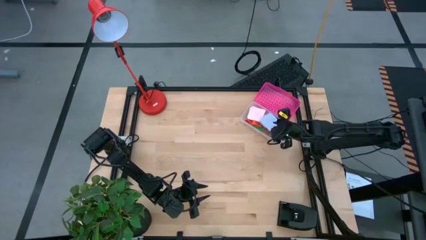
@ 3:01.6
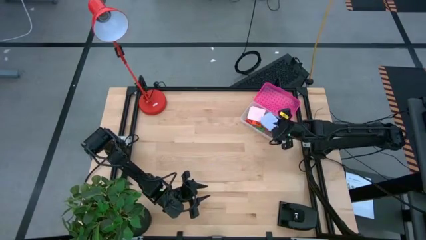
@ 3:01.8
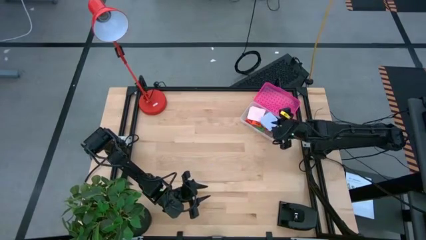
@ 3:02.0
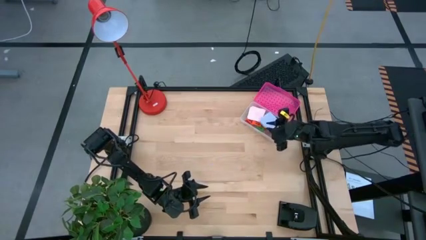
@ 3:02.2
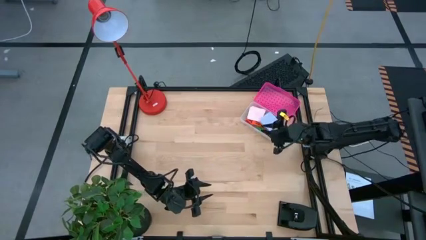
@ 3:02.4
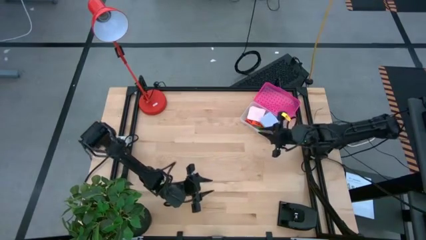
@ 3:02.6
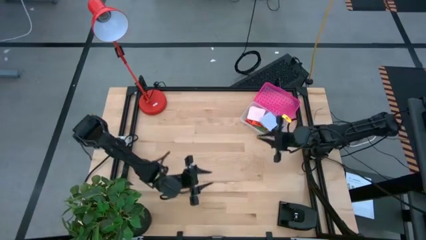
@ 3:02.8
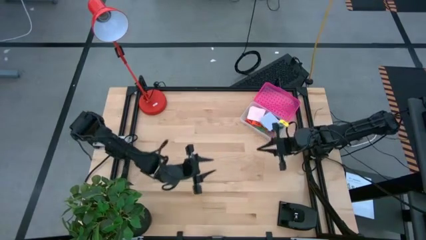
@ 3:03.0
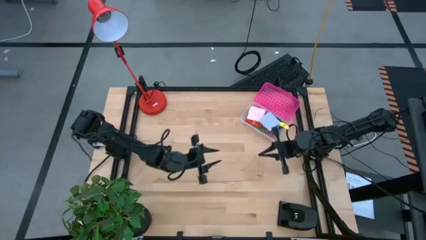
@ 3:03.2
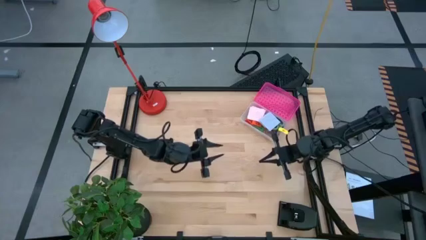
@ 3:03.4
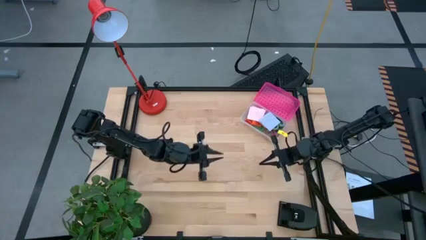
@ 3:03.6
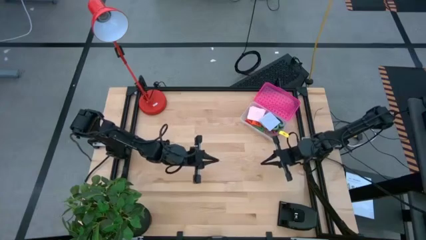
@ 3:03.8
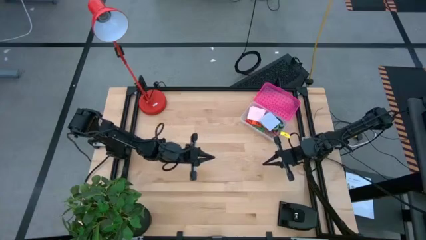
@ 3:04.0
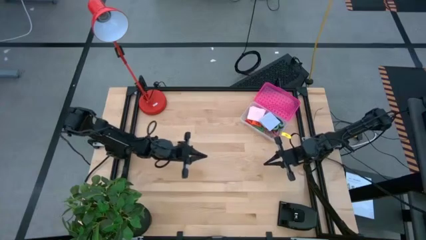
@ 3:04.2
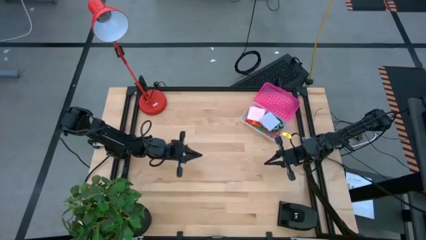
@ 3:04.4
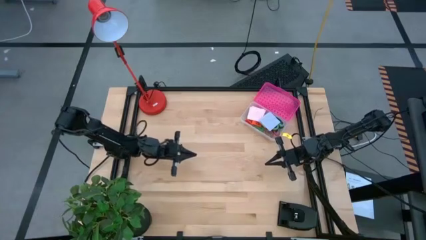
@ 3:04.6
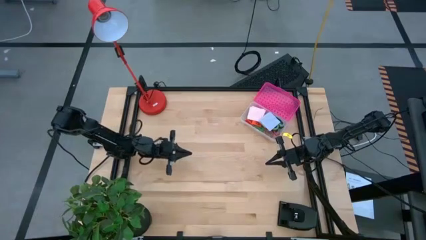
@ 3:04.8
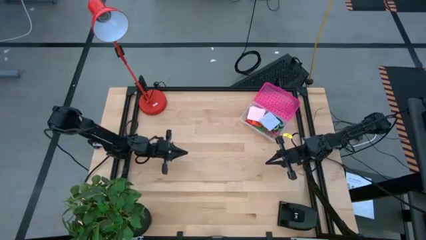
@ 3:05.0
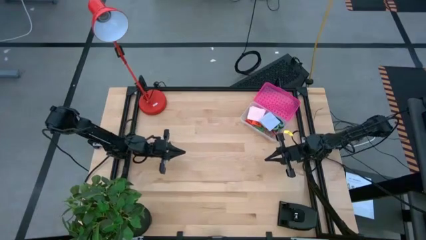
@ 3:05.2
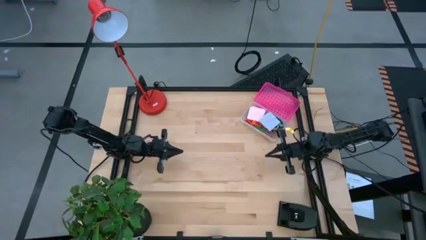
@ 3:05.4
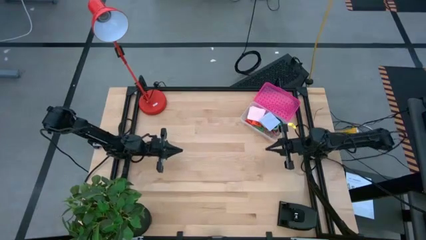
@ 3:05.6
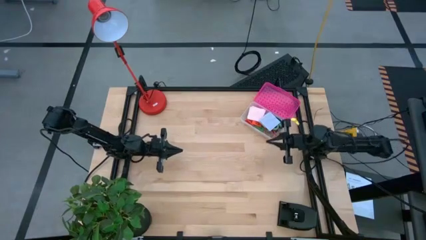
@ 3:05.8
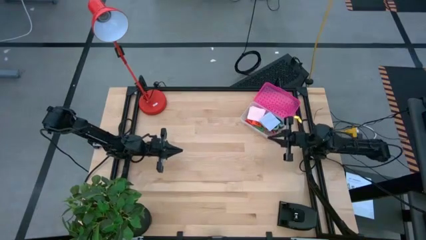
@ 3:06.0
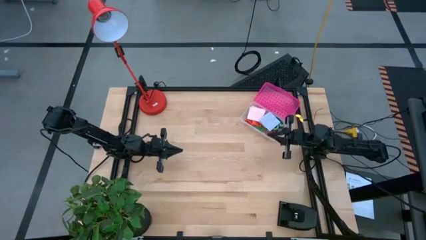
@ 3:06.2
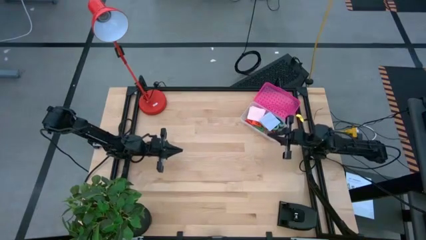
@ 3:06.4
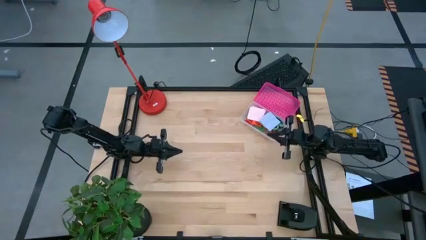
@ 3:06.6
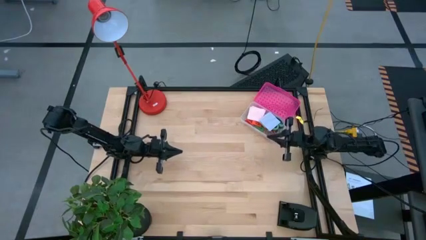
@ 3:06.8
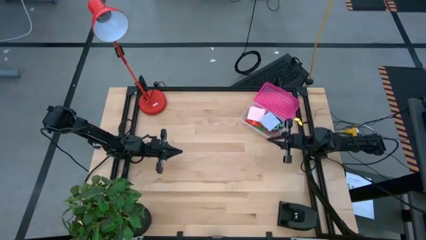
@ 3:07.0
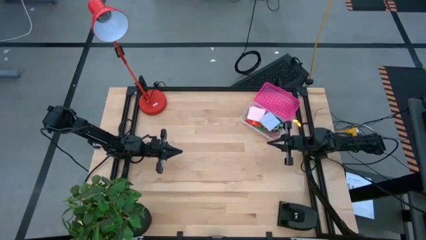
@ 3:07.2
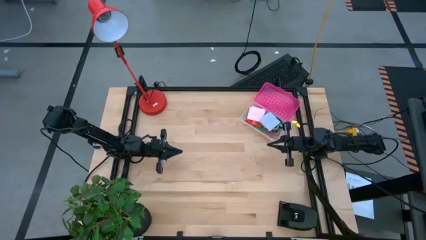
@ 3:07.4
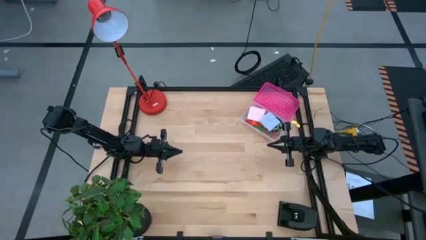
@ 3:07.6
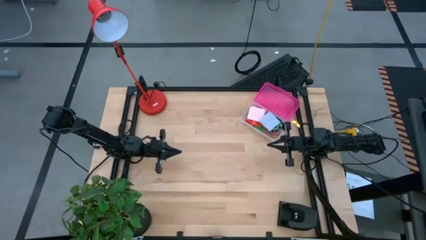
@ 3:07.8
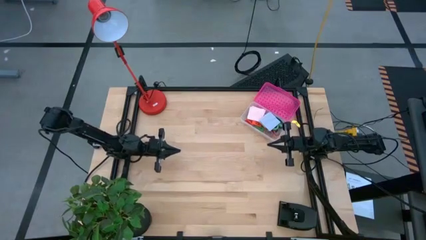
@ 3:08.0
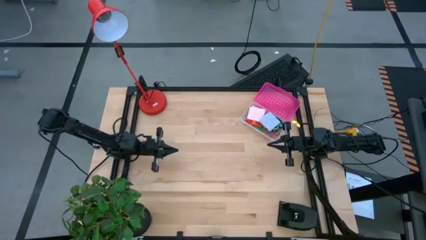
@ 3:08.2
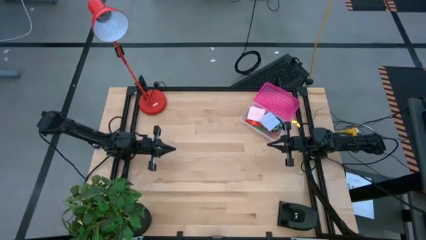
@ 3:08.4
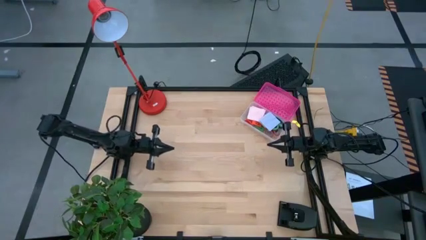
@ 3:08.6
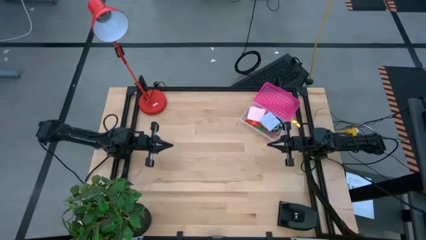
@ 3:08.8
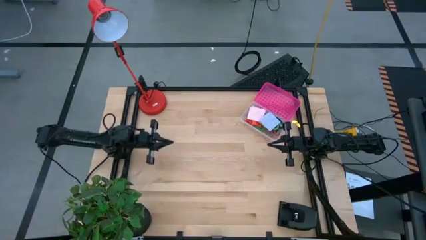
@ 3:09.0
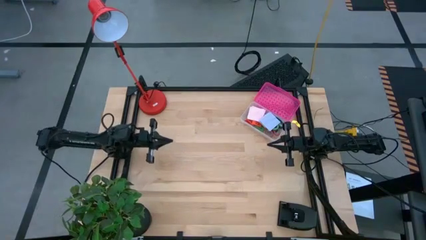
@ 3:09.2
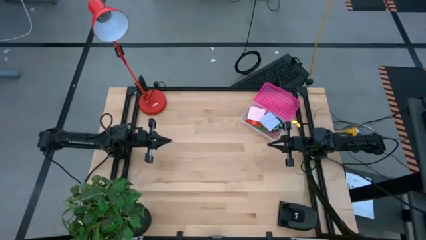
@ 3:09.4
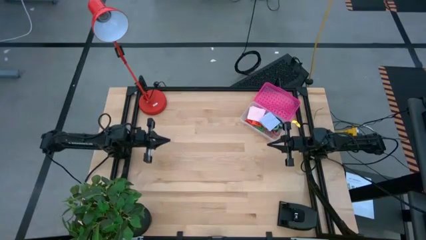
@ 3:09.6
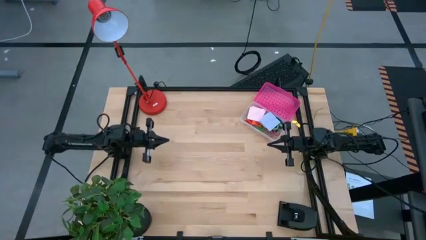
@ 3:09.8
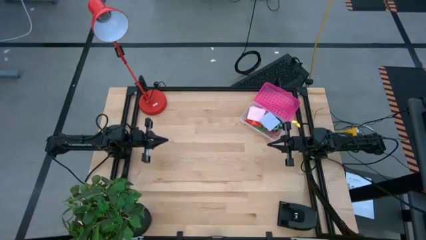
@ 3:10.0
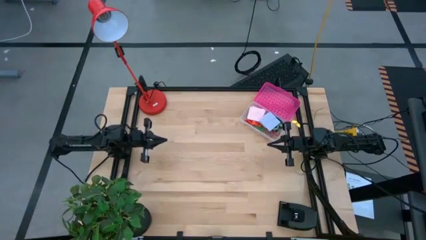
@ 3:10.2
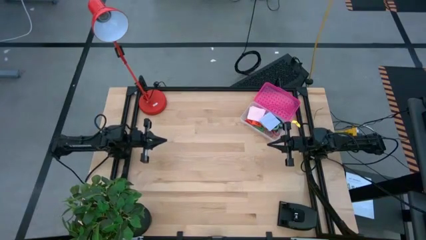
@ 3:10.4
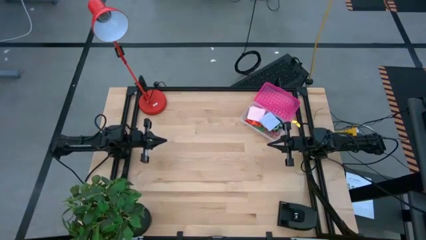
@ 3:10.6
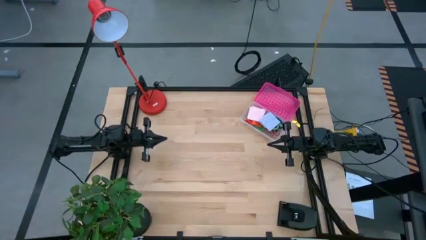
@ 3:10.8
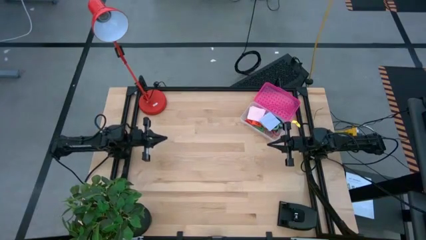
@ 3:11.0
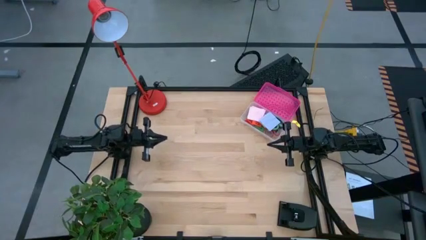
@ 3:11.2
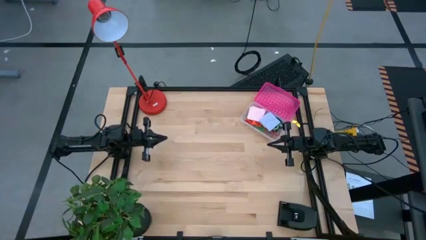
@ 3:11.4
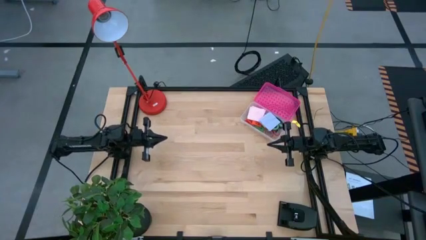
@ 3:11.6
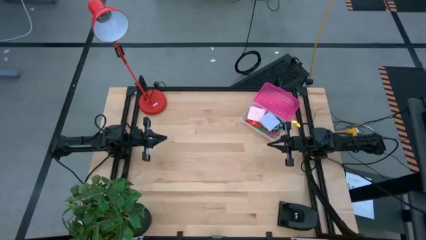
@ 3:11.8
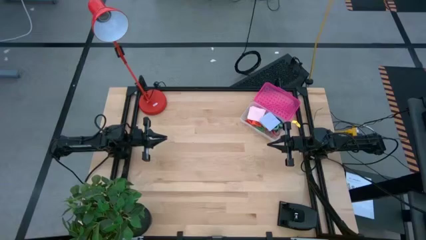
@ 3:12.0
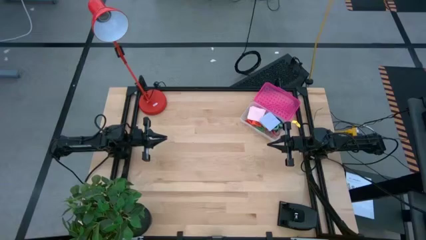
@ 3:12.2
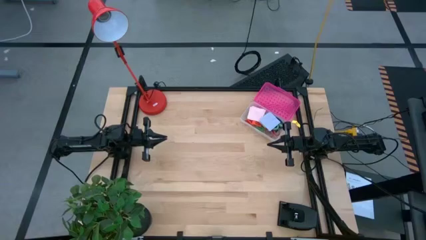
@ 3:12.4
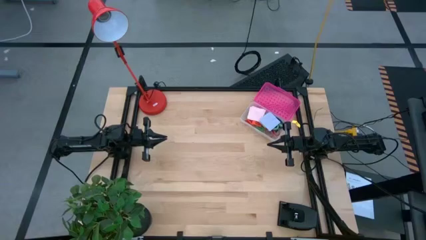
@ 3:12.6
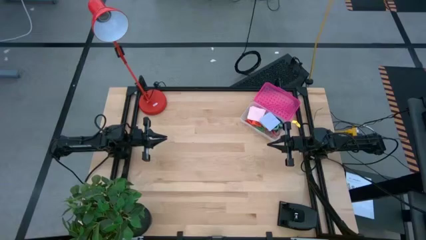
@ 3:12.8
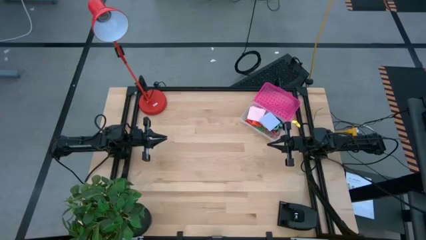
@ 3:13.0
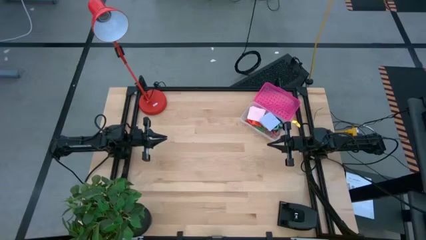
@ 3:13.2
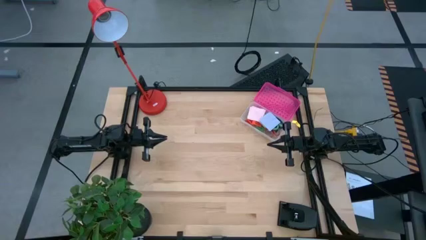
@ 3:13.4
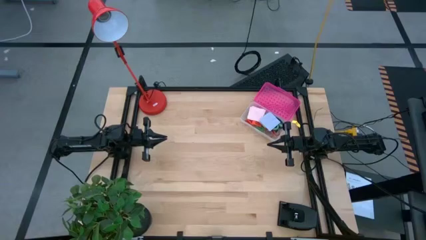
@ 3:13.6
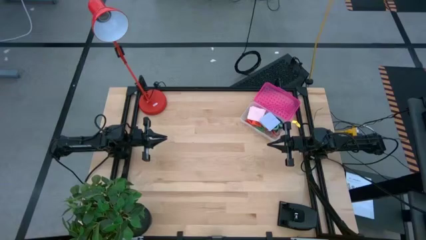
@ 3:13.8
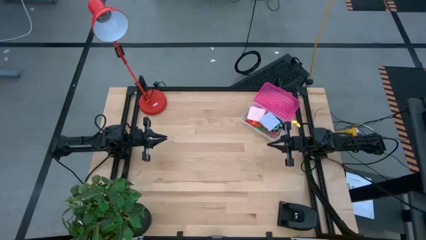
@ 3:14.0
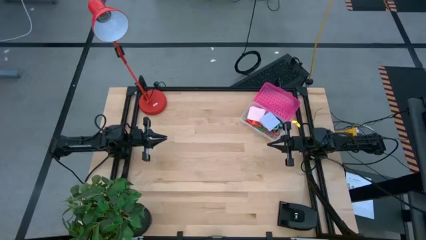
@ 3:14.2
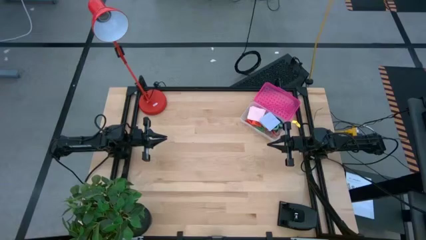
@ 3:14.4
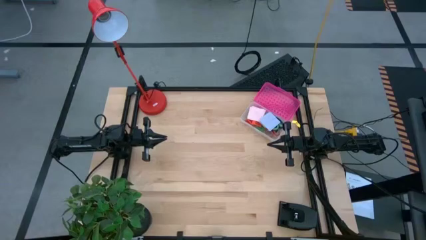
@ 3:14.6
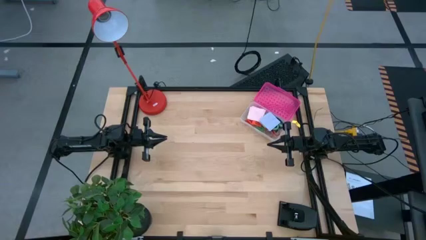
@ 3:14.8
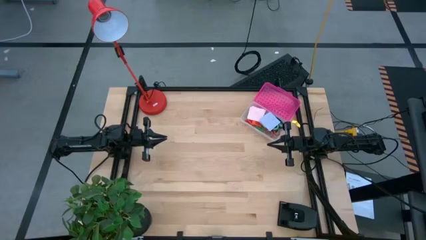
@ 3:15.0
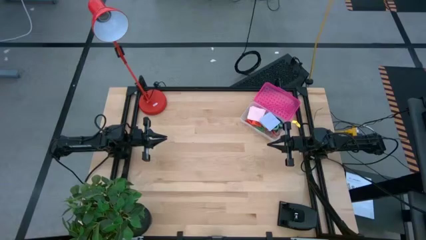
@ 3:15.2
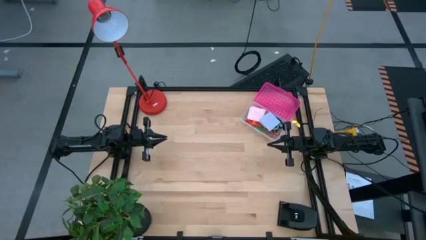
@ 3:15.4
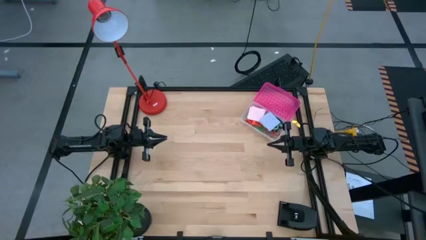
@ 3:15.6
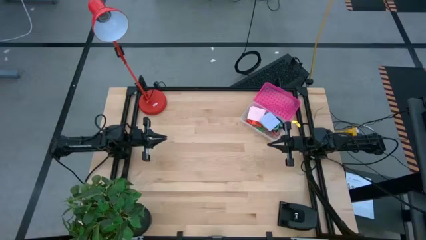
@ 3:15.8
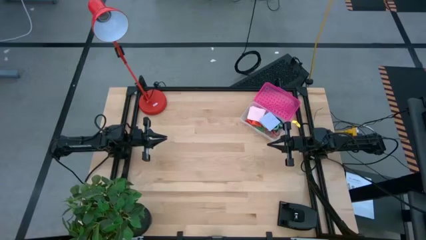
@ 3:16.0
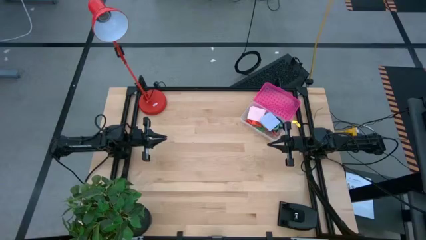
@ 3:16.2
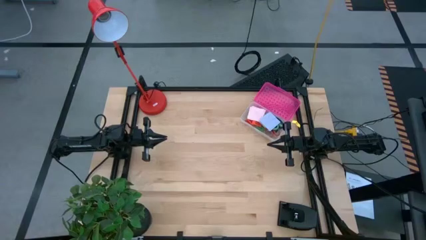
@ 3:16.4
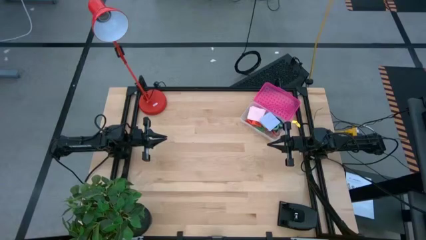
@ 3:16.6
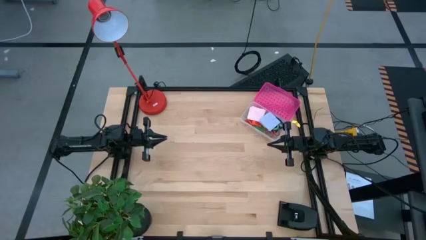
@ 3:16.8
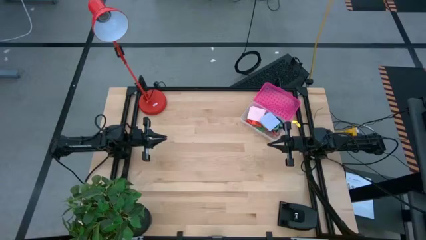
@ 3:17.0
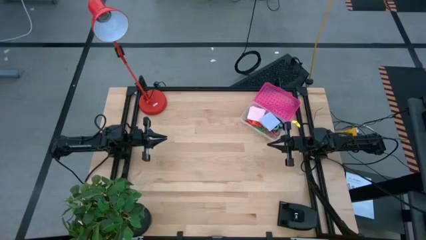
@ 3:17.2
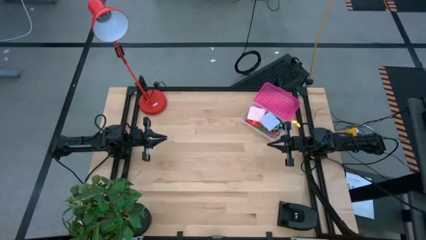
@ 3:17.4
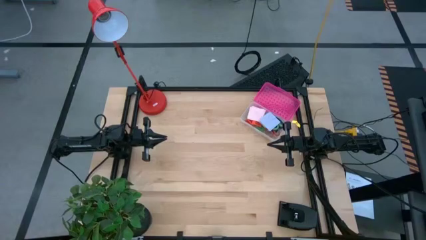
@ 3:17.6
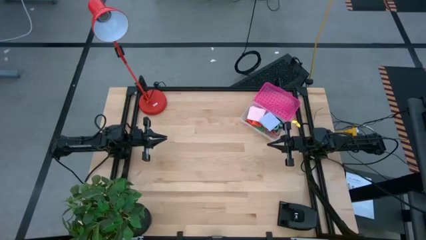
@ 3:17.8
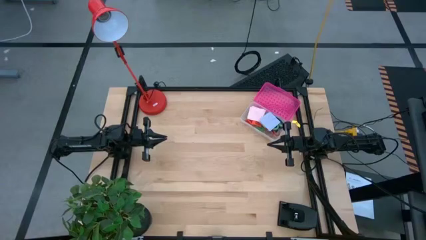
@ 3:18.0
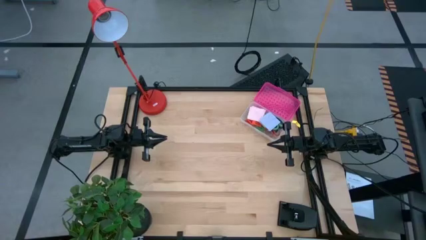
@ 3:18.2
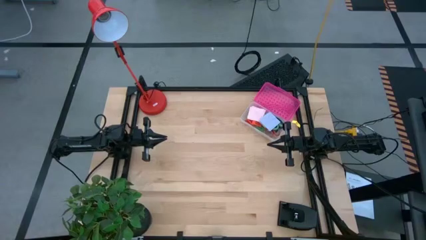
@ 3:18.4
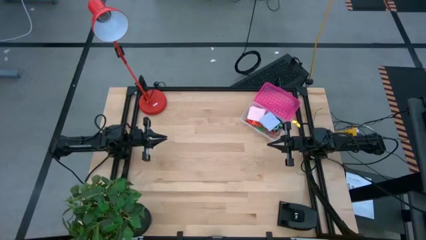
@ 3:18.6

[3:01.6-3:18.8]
Task: Pack school essentials
Return to Home Position
